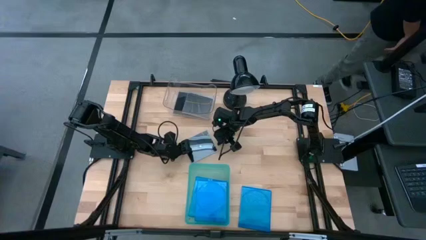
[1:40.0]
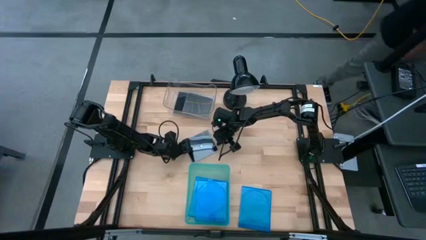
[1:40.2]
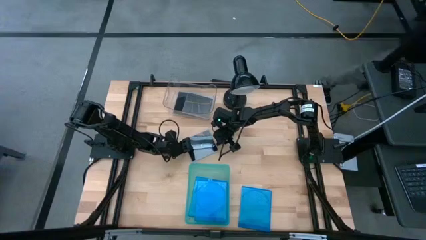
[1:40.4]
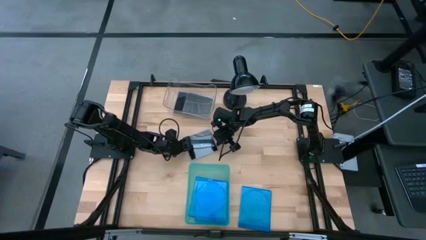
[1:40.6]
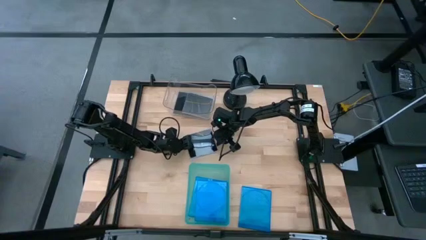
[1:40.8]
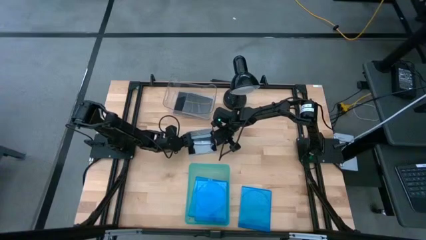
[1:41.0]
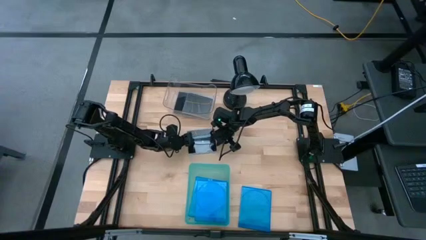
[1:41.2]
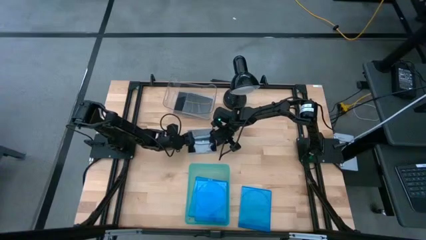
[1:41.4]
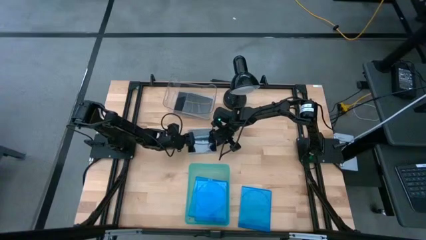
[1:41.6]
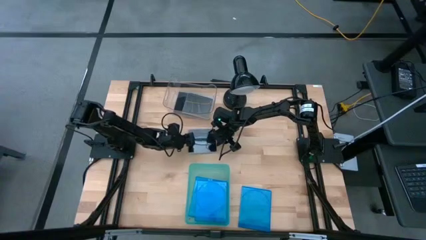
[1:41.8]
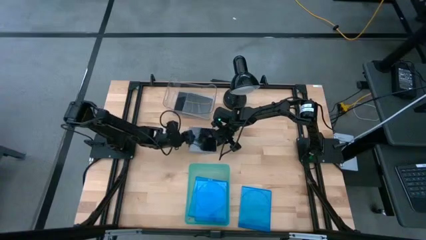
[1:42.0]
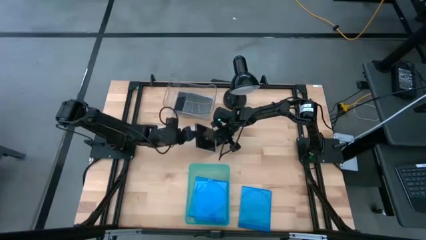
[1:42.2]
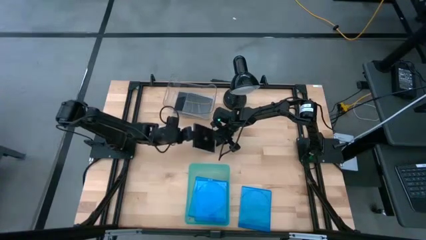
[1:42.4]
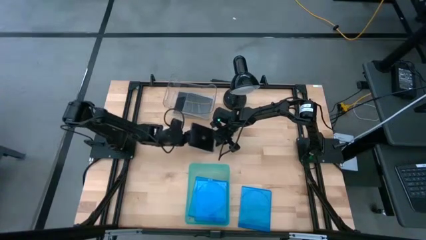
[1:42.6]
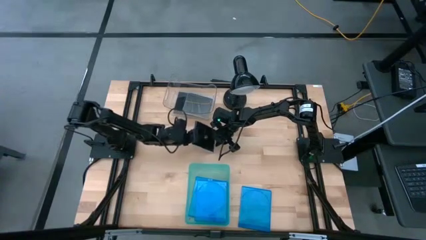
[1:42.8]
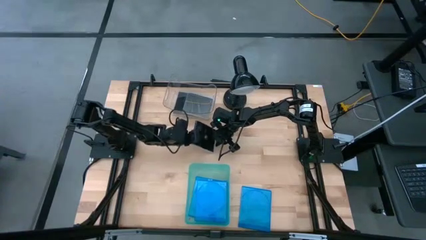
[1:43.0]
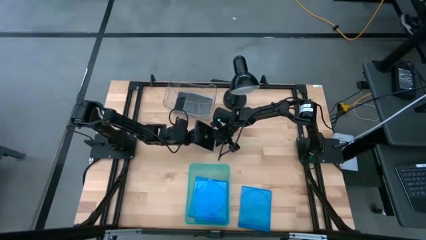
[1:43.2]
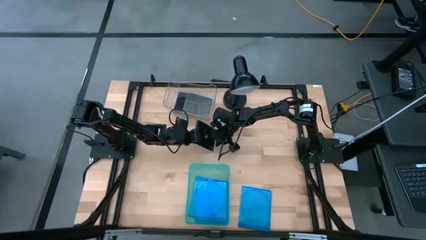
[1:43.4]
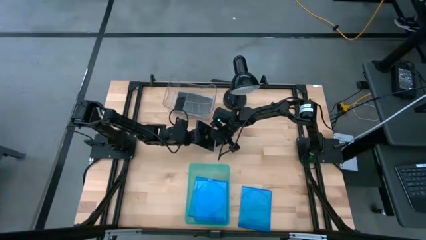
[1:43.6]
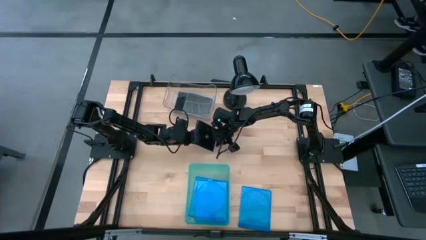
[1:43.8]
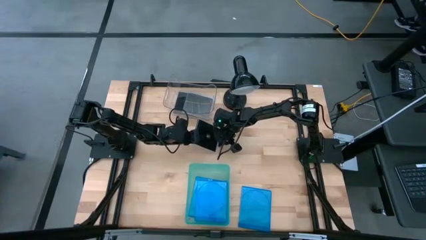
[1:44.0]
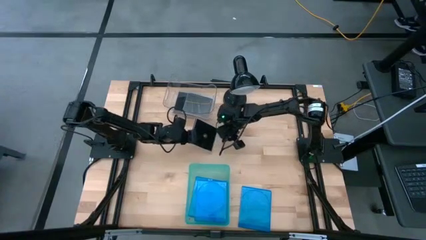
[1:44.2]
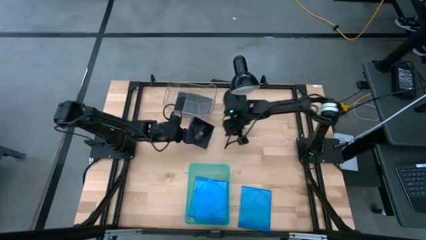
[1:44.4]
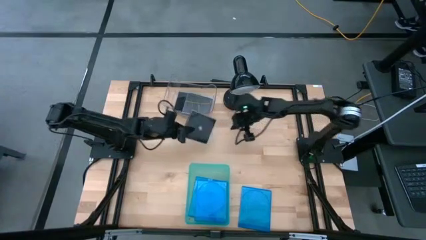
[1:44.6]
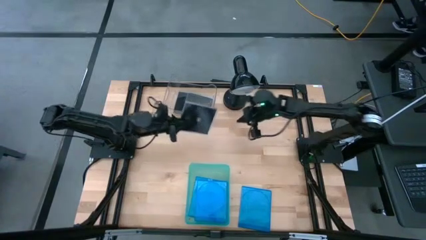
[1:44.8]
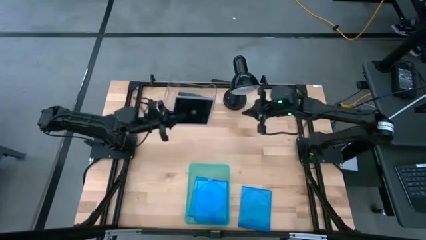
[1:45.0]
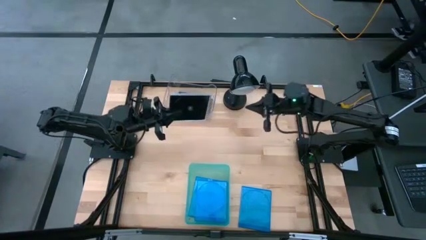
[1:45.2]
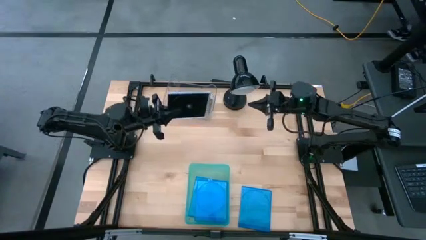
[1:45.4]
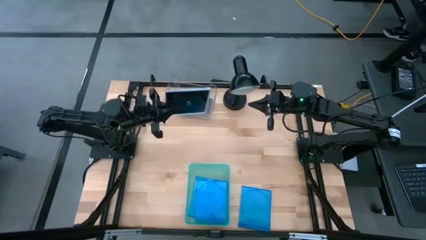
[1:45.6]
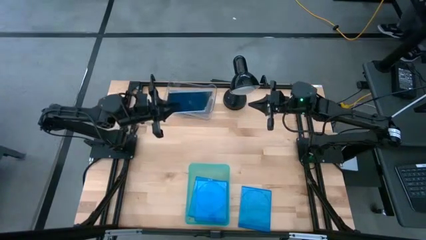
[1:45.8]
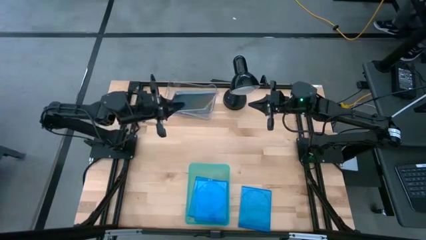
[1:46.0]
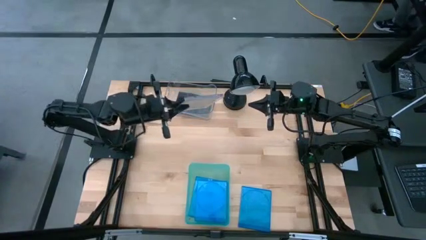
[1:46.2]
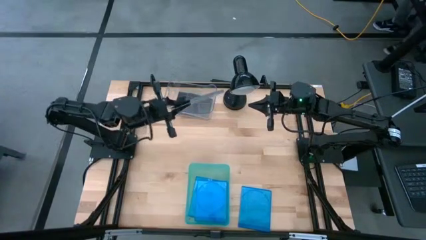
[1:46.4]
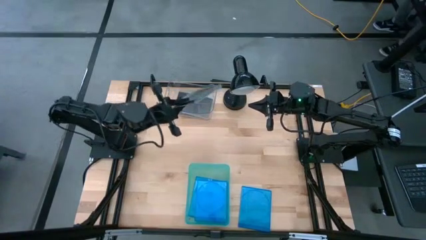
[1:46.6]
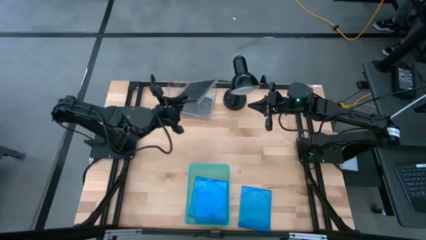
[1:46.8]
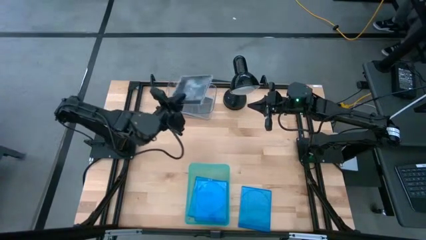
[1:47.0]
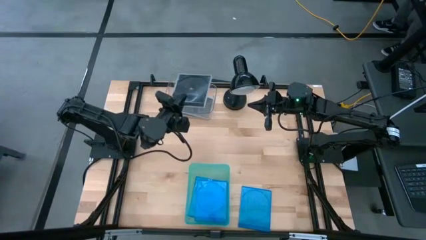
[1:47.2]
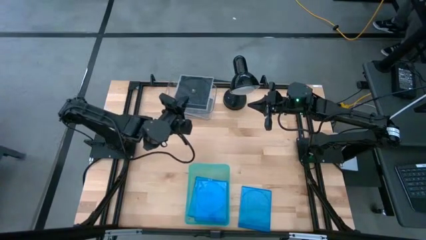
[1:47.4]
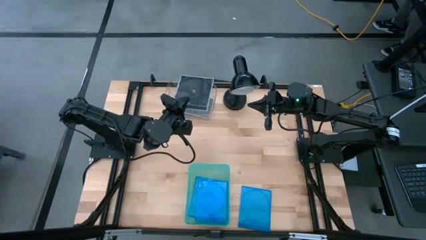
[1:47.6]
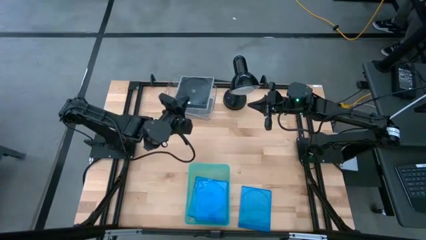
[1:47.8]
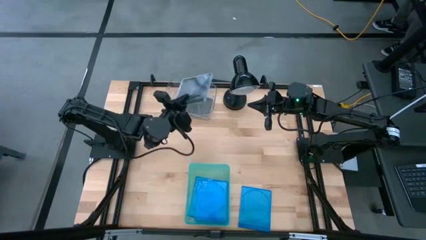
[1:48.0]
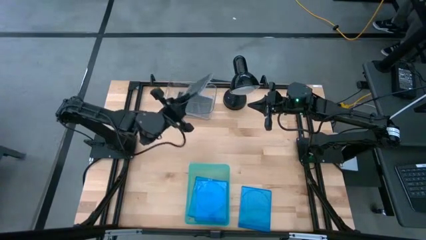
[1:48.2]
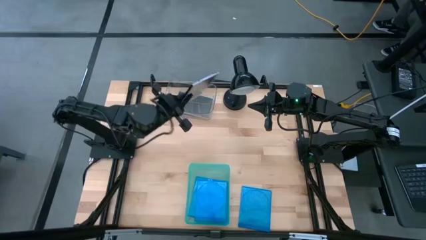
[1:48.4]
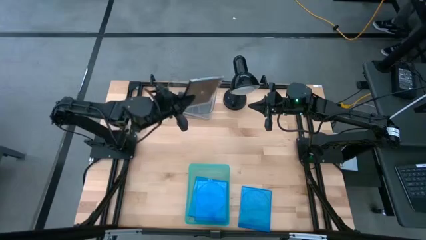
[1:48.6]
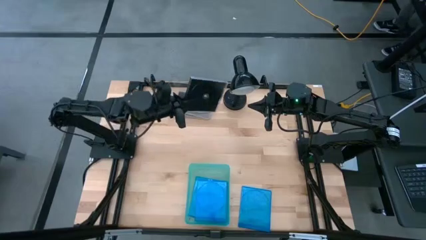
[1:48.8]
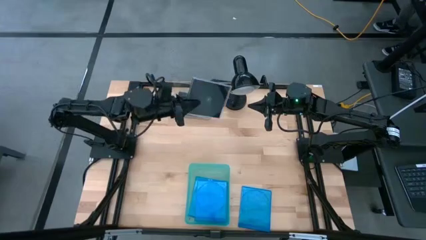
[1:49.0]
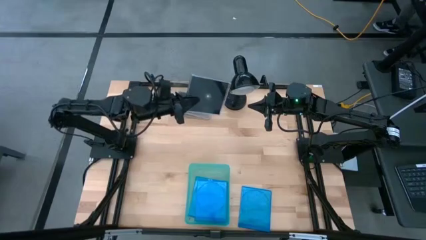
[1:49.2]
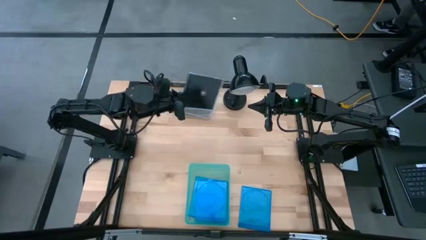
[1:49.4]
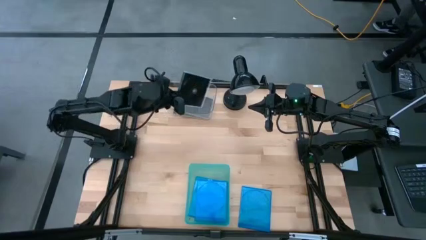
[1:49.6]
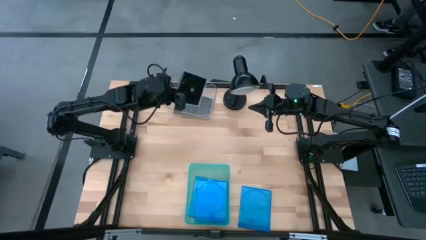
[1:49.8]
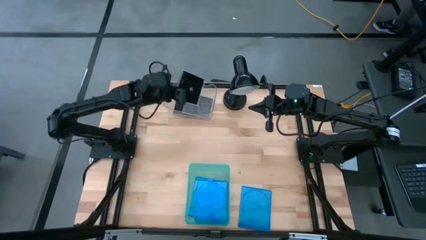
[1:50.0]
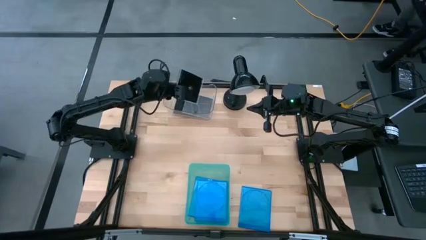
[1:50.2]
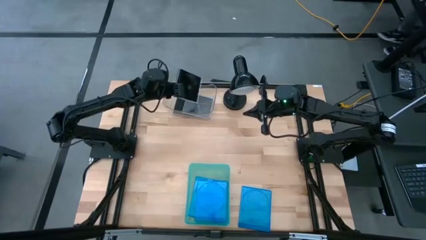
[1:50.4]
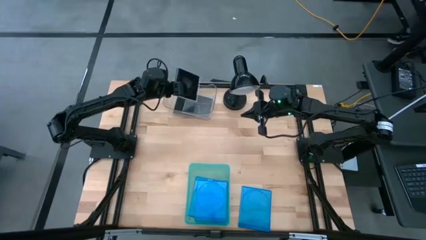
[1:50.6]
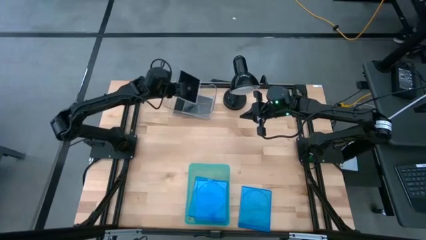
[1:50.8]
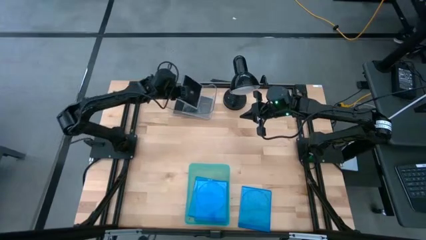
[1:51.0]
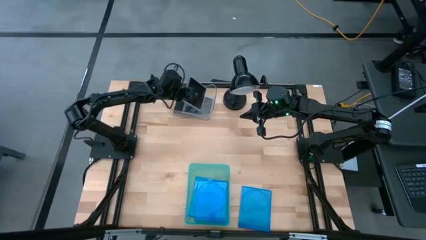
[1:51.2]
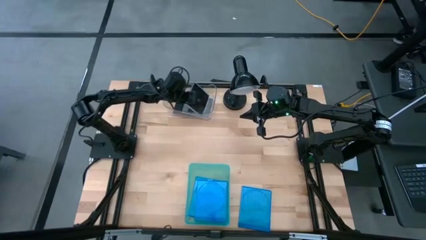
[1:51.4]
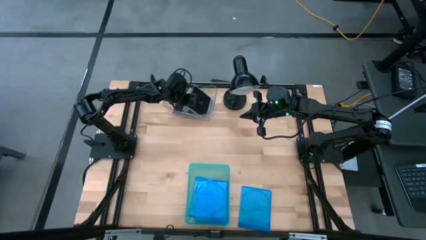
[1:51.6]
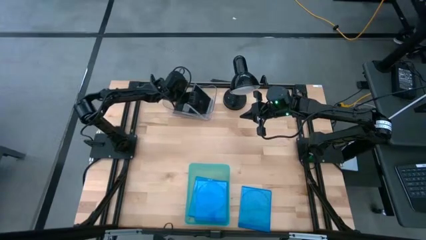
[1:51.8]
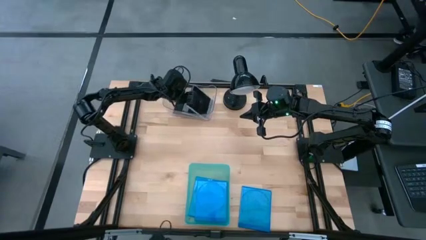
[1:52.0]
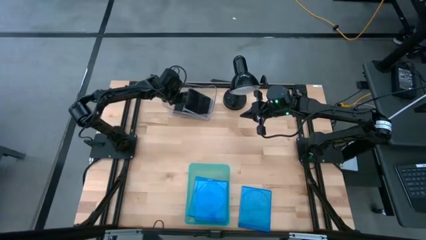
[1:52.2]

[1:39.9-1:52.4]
Task: Pick & place jewel cases by type
Put the black CD case into the transparent bin
